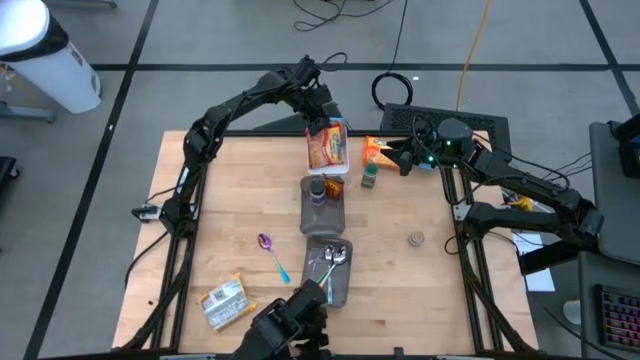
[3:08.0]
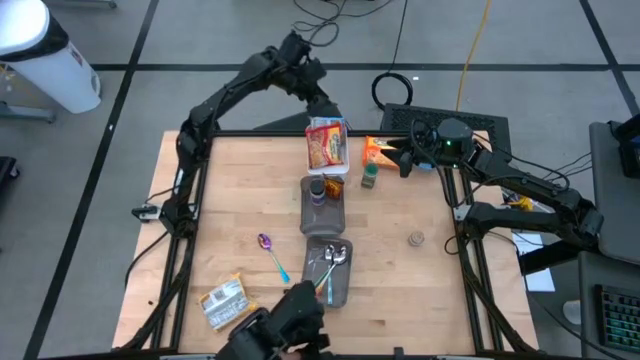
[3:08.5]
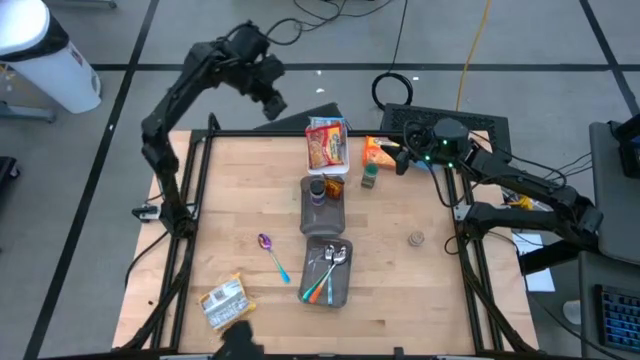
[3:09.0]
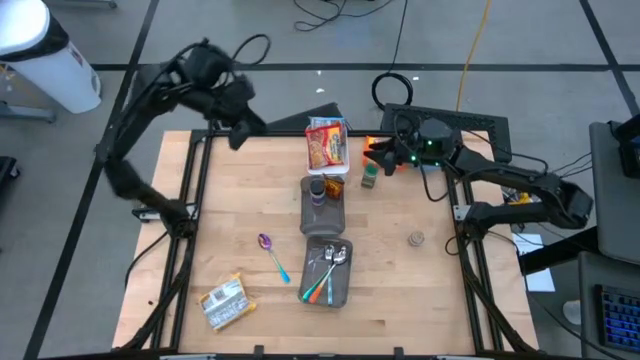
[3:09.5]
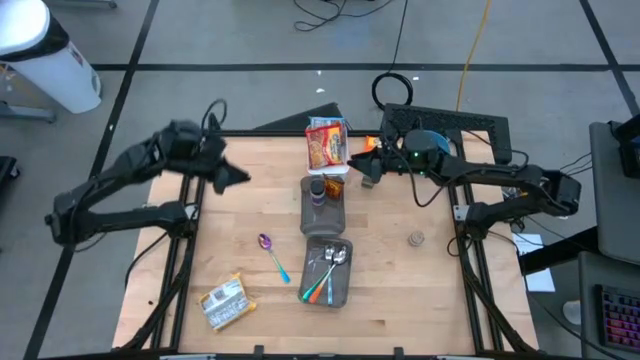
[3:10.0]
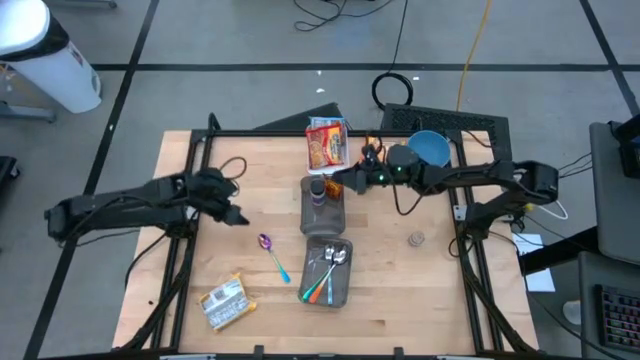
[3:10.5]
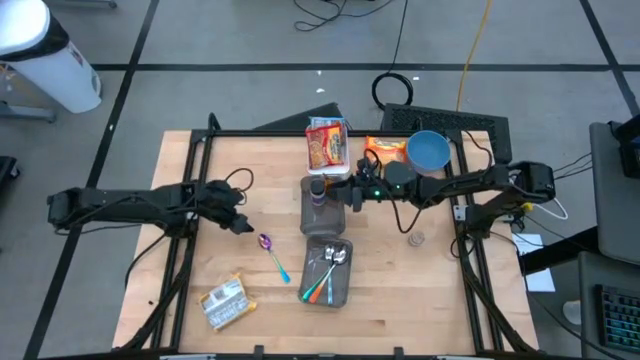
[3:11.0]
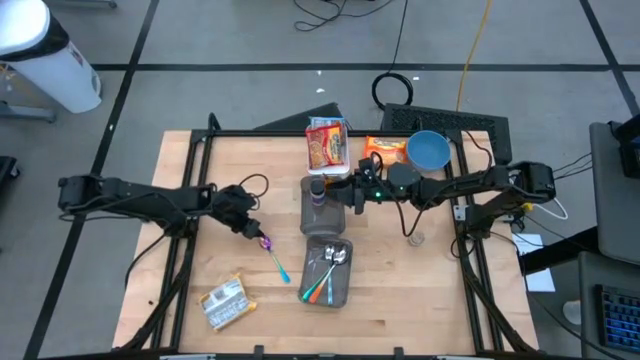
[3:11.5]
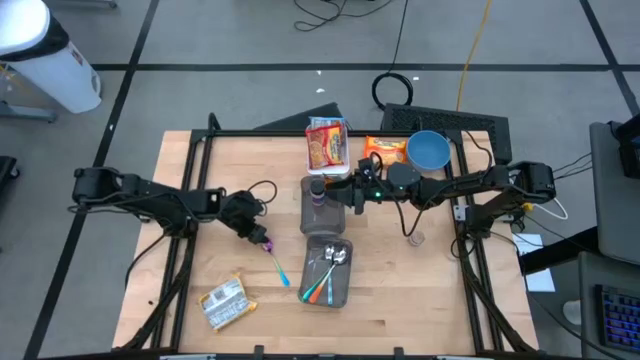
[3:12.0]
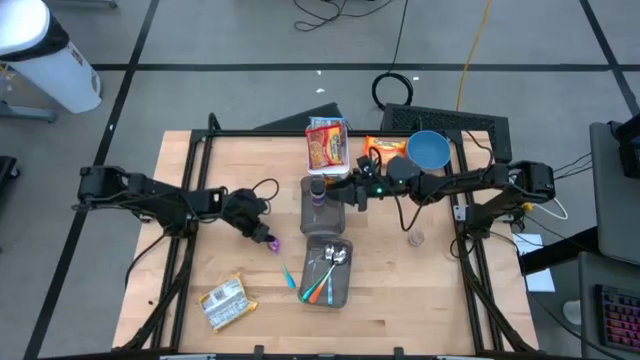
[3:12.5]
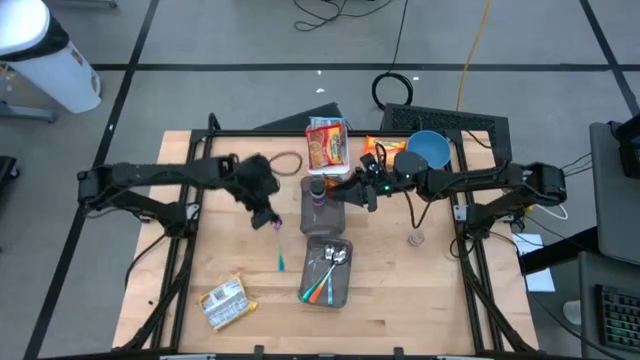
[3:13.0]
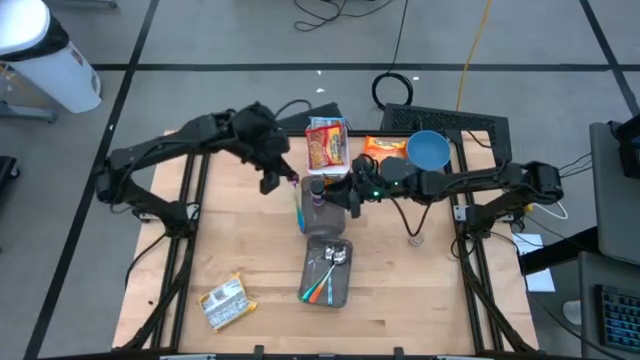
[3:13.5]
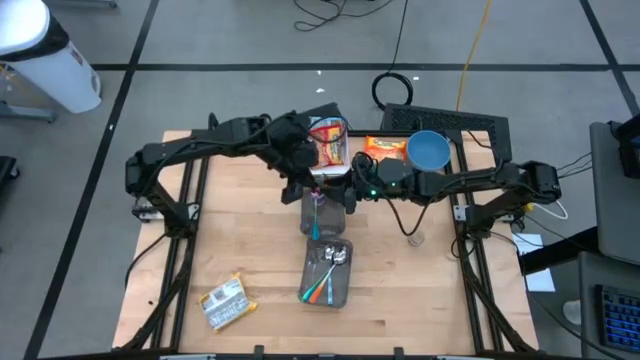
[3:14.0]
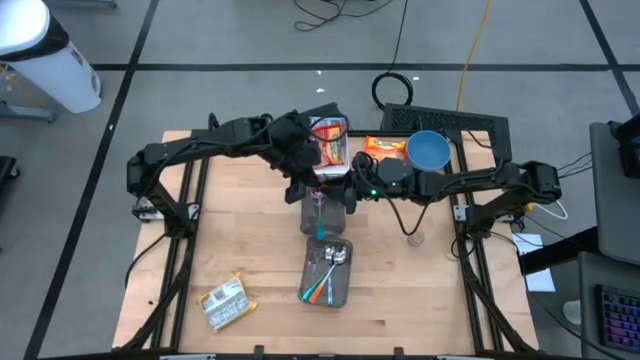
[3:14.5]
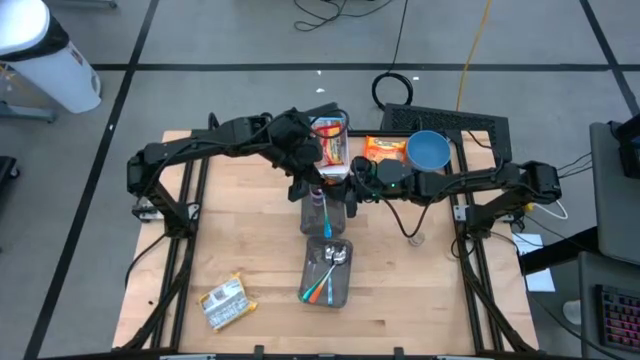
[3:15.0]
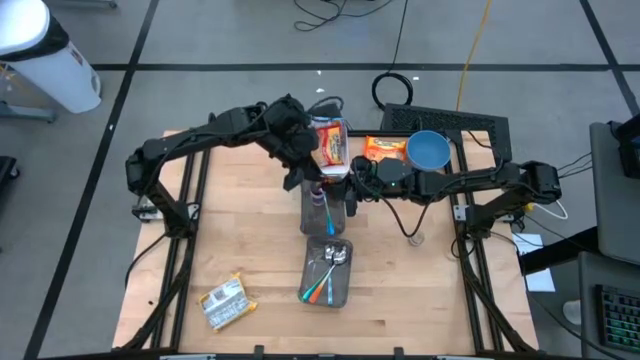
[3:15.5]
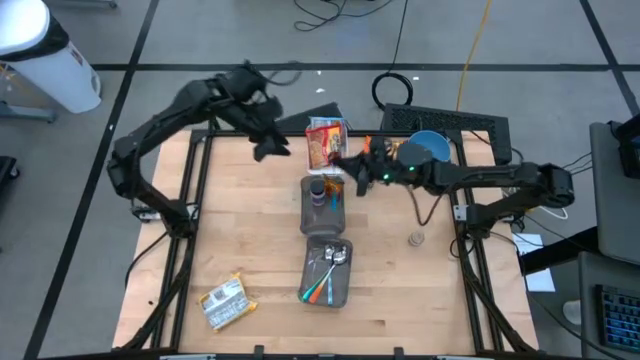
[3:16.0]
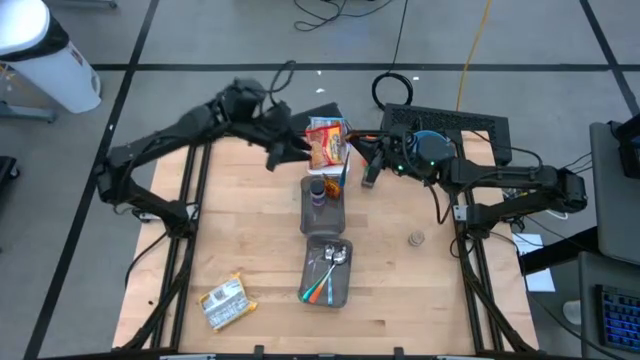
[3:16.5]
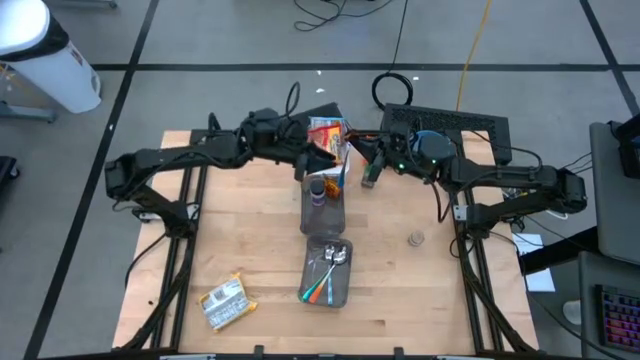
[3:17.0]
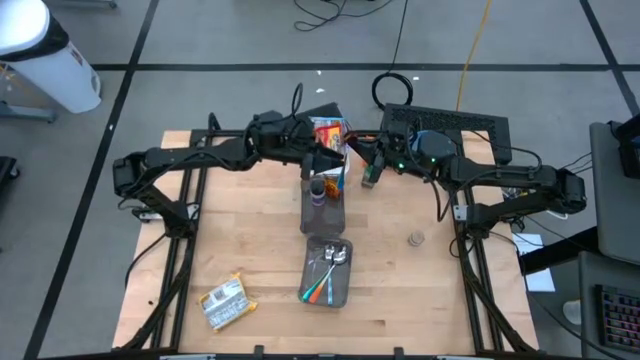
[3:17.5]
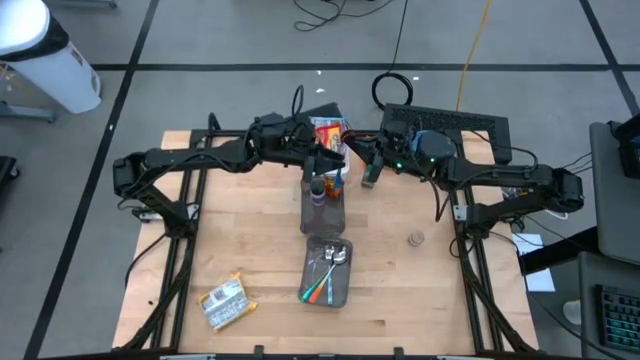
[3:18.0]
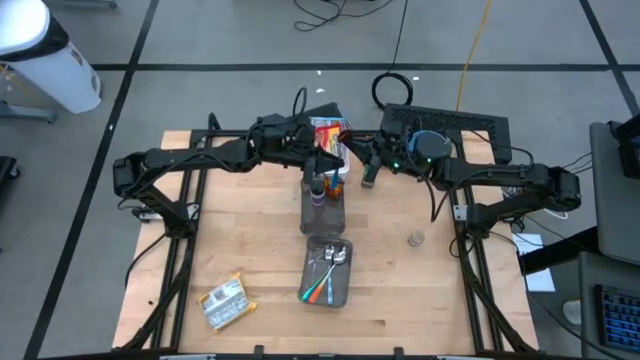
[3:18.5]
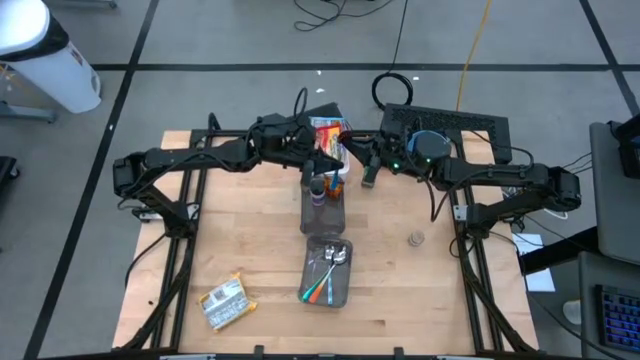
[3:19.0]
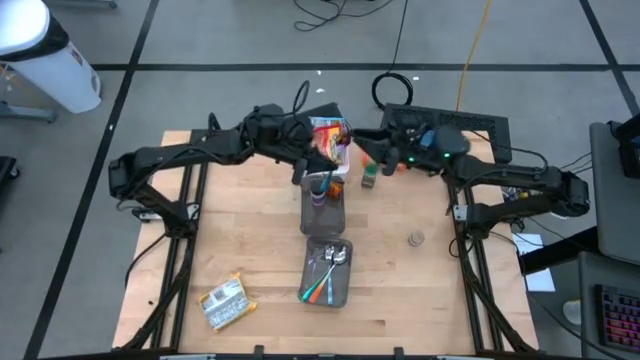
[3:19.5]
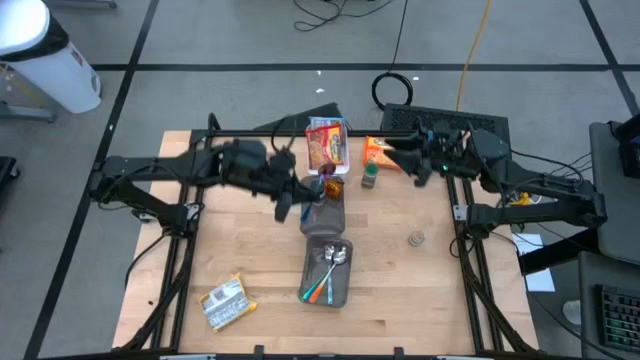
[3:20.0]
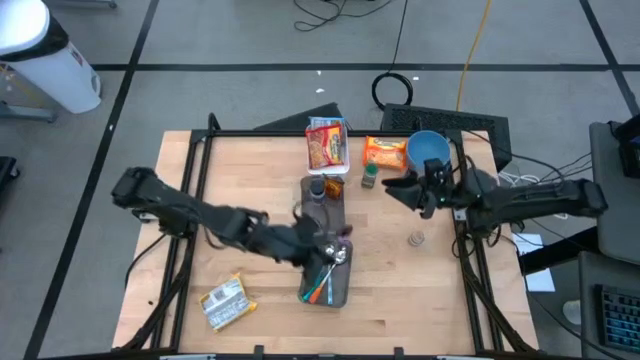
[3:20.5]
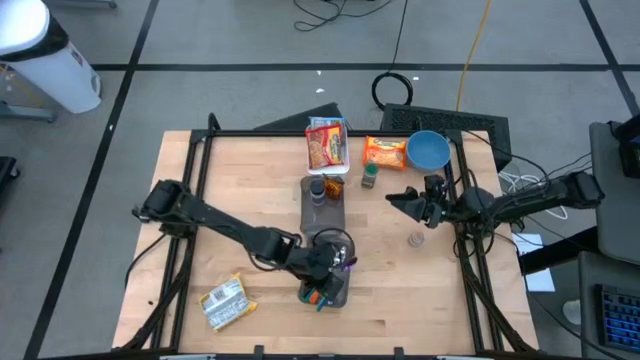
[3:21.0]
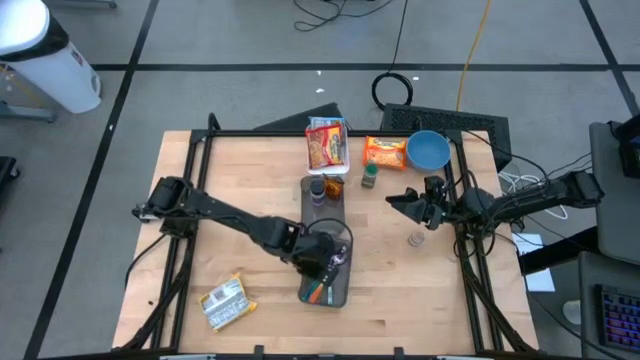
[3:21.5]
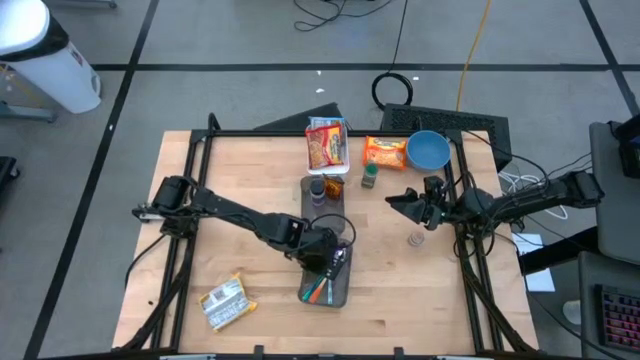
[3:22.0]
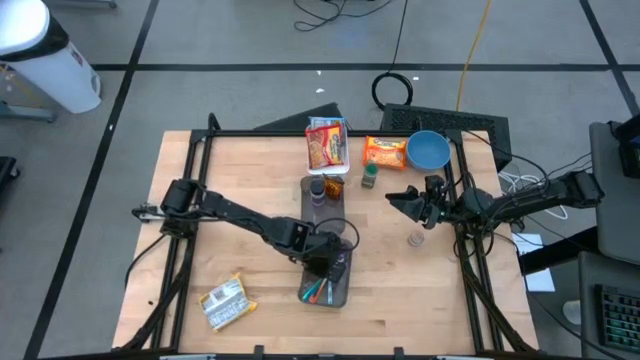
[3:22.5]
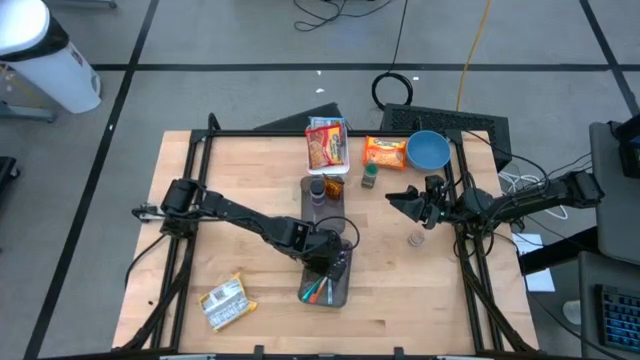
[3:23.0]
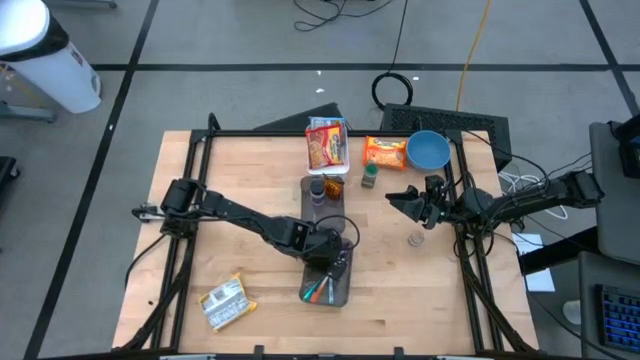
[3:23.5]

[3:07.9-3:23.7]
Task: Pick & Place Food Item
Put the purple spoon into the bottom black bin

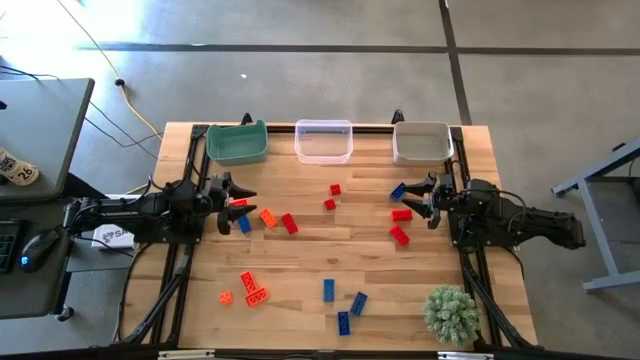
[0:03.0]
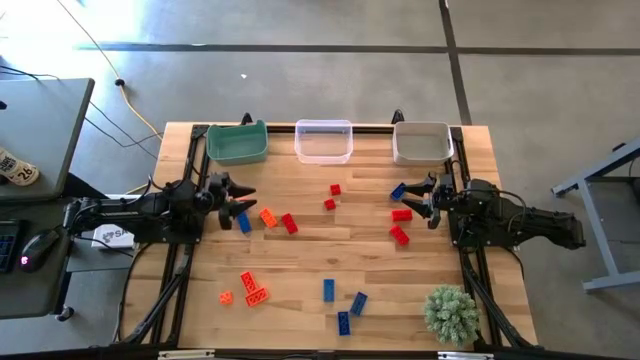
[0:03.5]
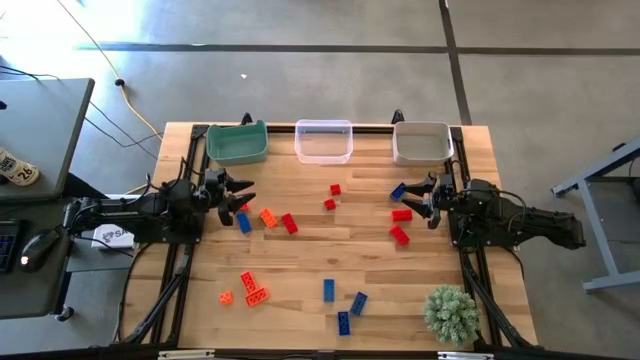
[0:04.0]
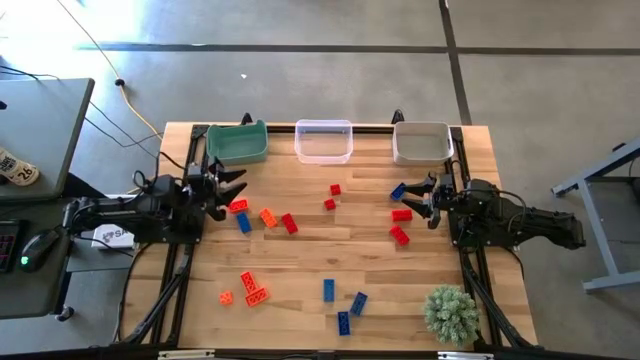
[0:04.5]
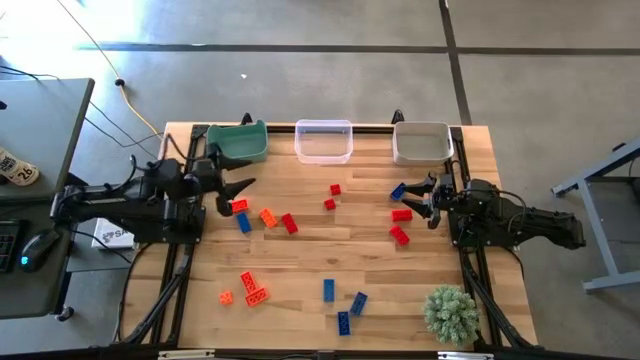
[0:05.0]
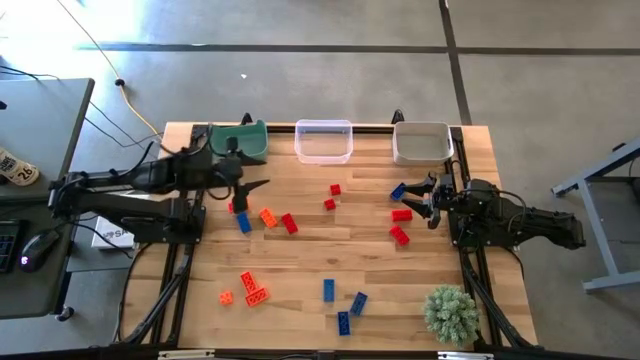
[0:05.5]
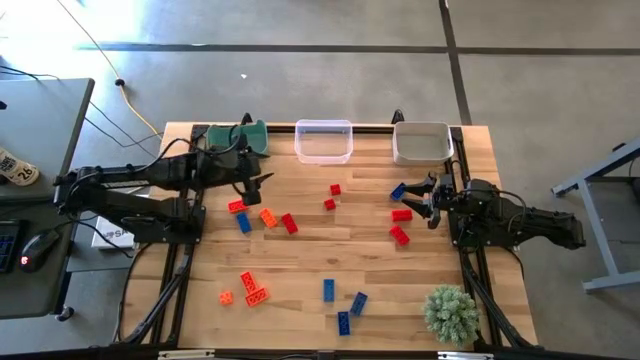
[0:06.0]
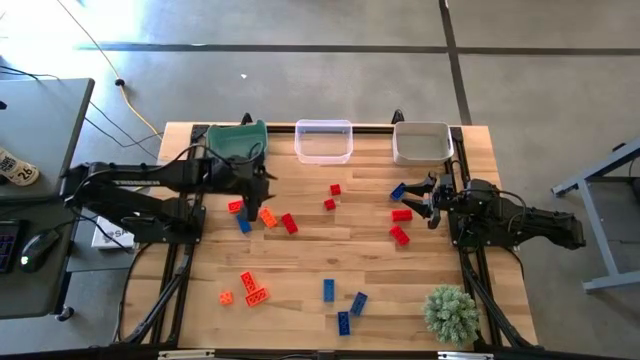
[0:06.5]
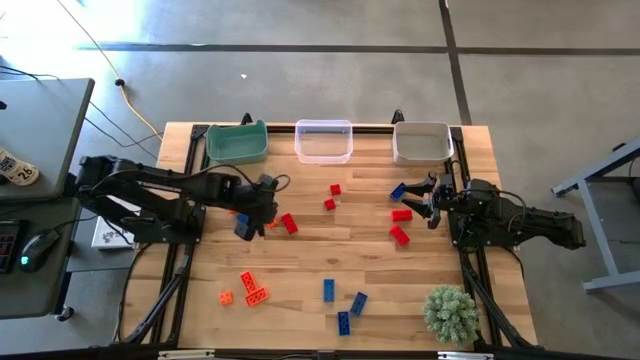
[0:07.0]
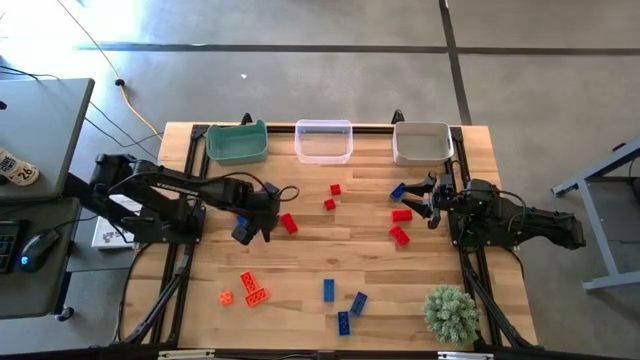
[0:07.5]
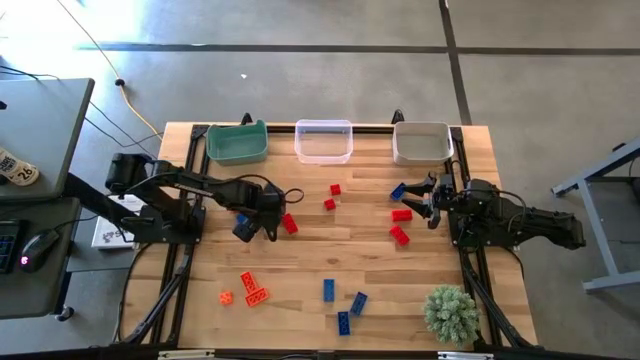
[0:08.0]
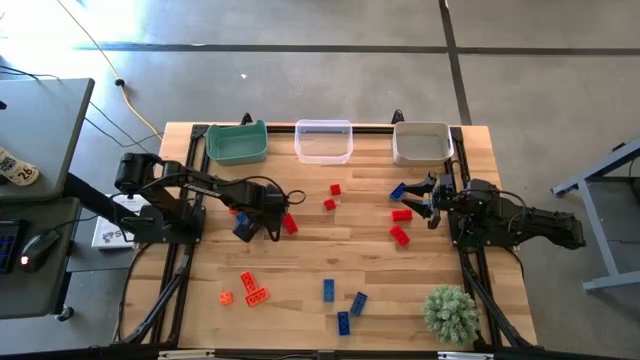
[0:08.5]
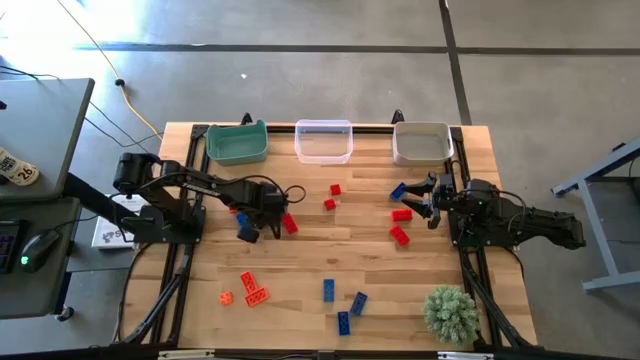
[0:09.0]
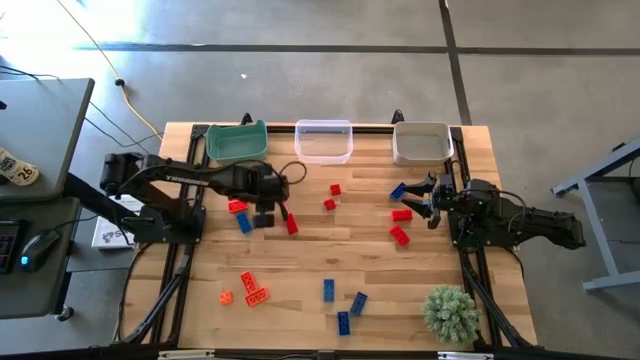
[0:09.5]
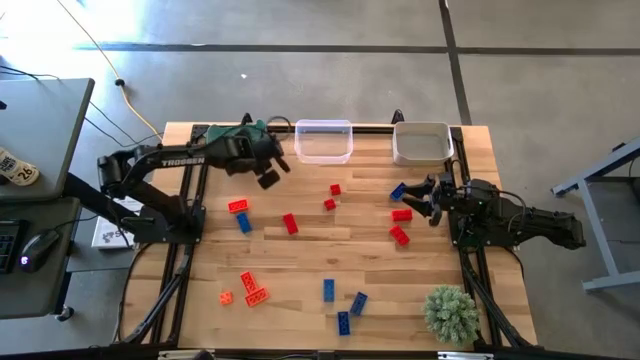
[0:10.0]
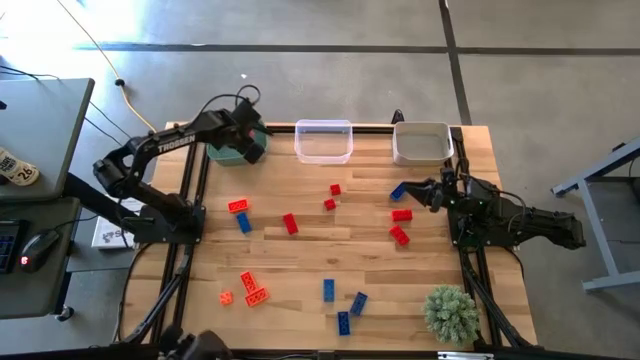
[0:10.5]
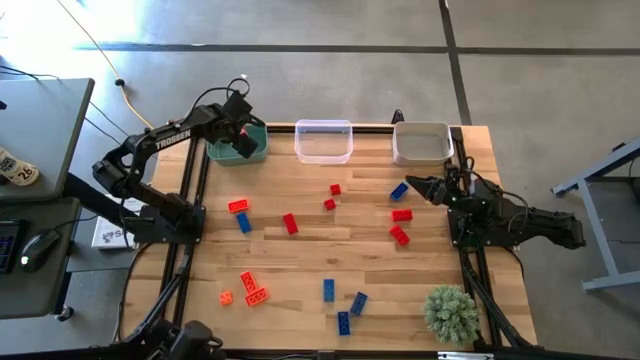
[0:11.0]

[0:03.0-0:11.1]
Task: Sort & place blocks by color
Put the orange game piece into the green bin
